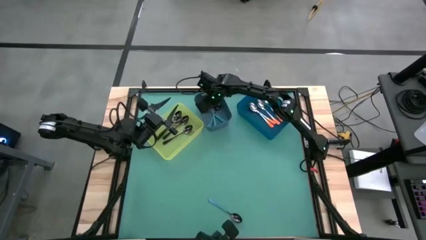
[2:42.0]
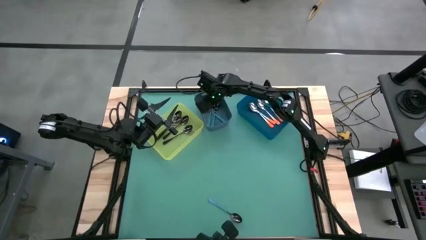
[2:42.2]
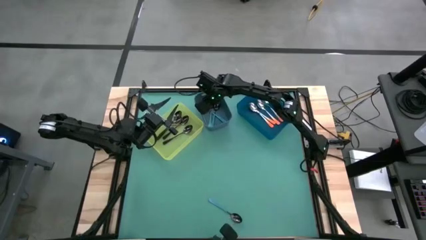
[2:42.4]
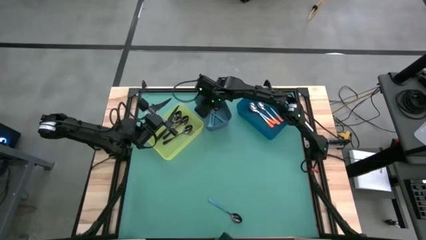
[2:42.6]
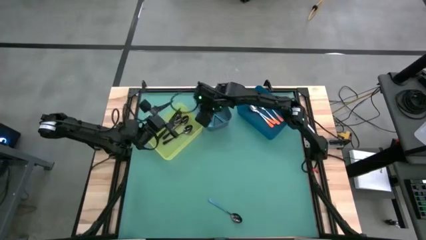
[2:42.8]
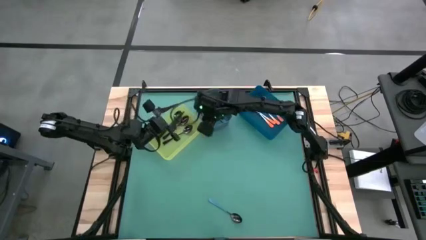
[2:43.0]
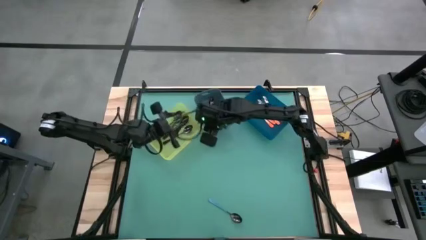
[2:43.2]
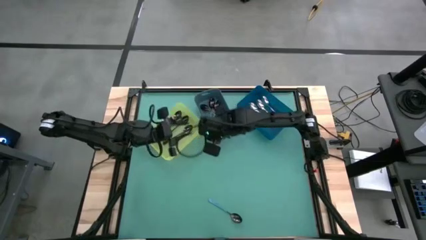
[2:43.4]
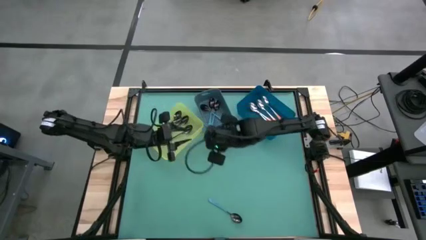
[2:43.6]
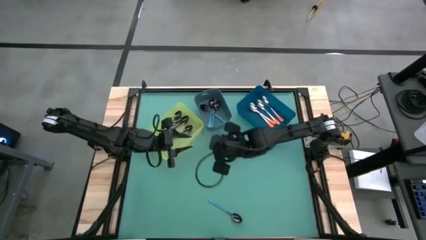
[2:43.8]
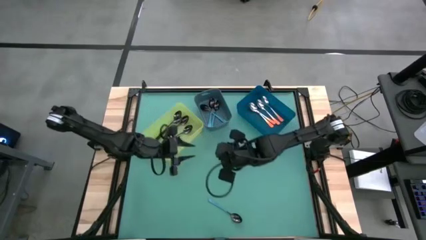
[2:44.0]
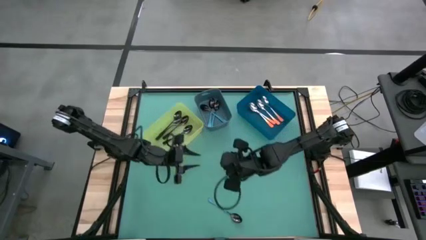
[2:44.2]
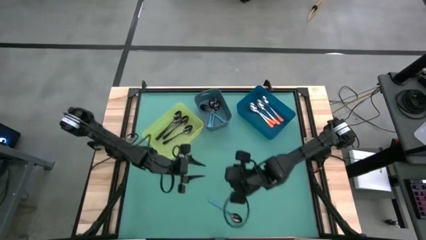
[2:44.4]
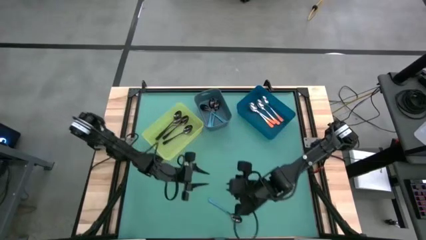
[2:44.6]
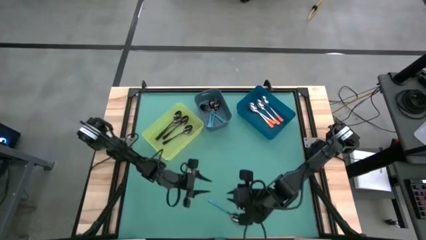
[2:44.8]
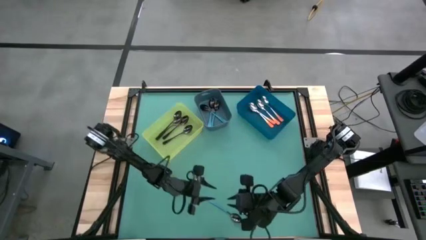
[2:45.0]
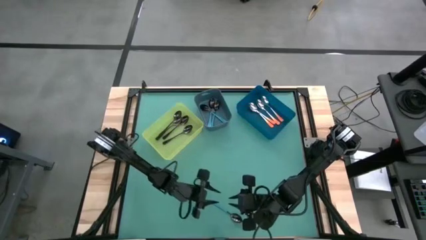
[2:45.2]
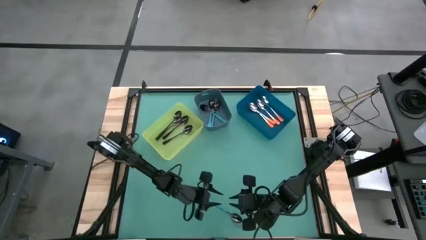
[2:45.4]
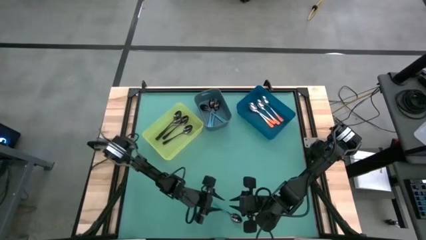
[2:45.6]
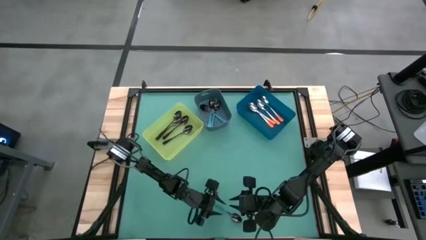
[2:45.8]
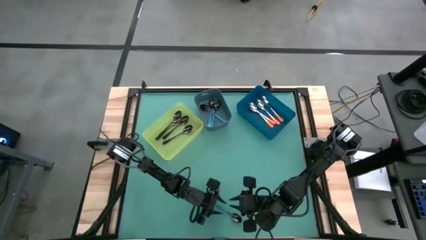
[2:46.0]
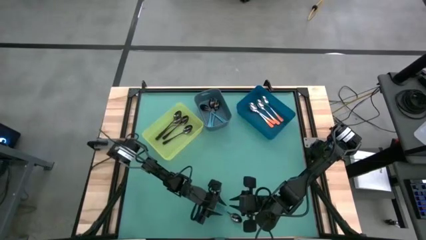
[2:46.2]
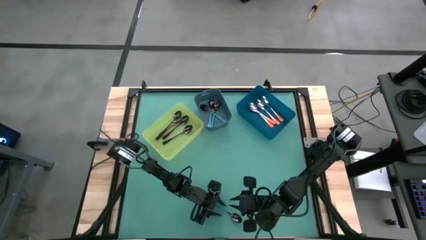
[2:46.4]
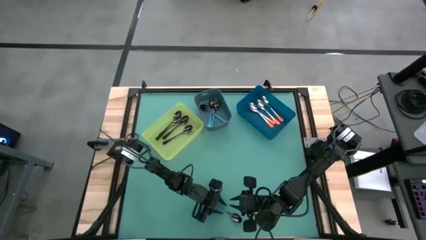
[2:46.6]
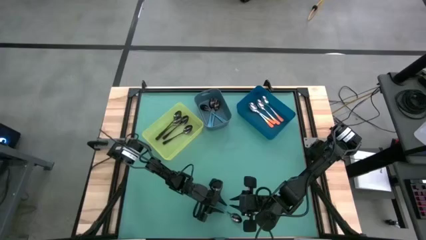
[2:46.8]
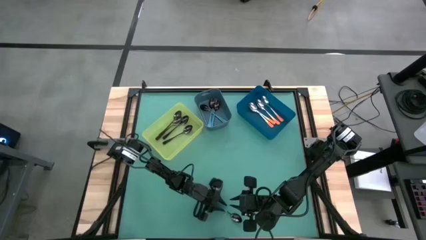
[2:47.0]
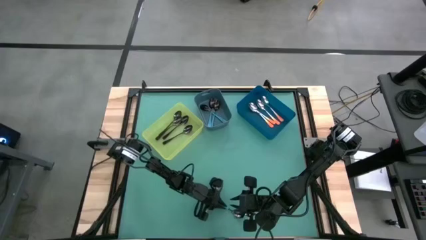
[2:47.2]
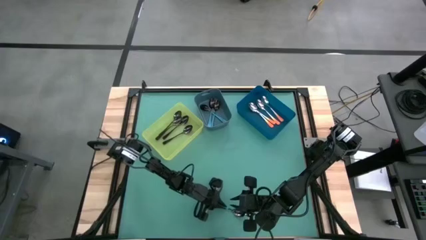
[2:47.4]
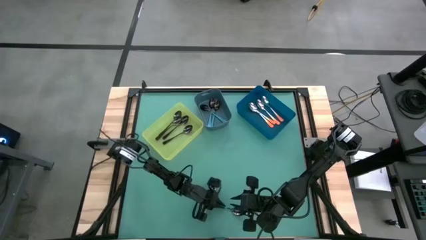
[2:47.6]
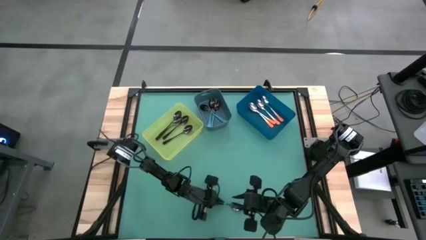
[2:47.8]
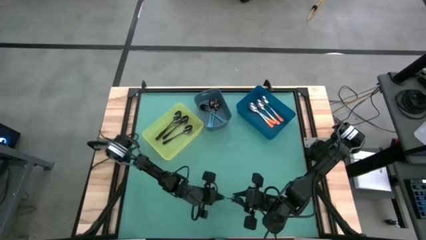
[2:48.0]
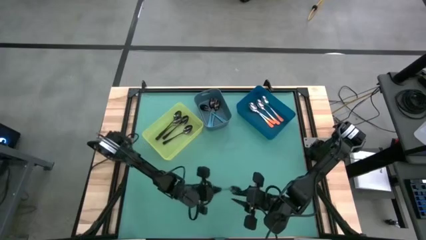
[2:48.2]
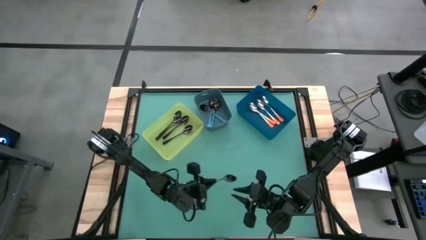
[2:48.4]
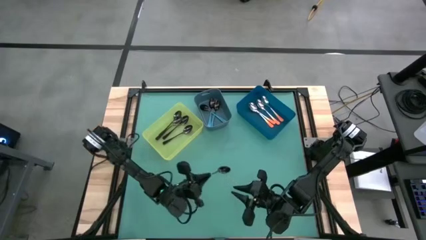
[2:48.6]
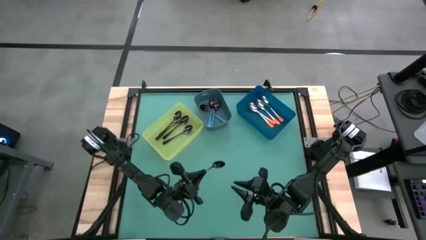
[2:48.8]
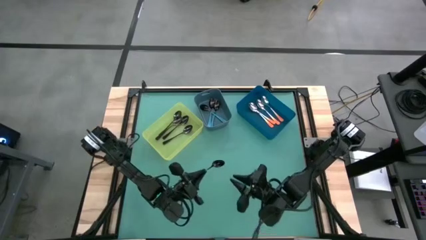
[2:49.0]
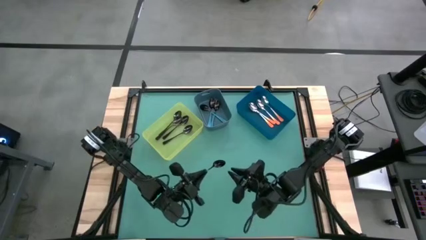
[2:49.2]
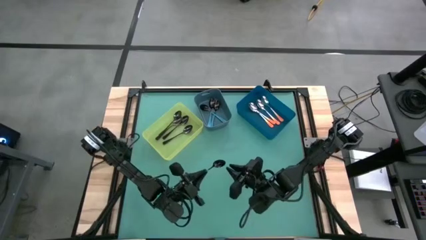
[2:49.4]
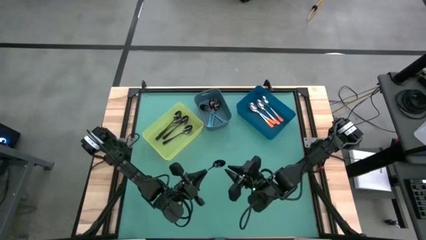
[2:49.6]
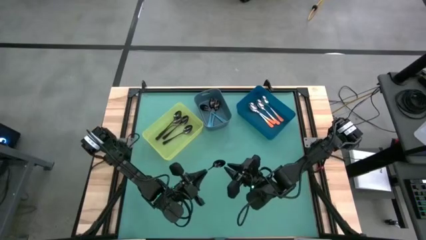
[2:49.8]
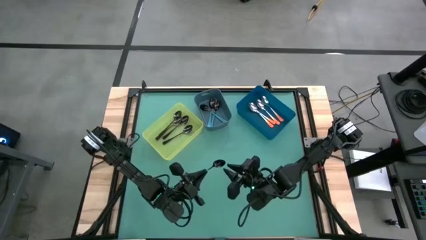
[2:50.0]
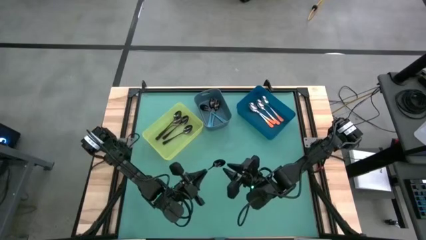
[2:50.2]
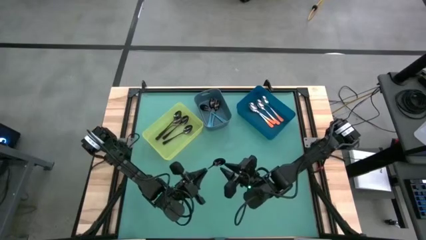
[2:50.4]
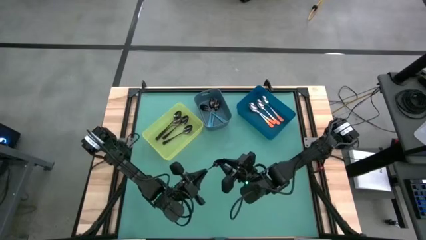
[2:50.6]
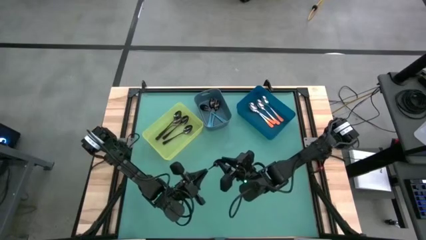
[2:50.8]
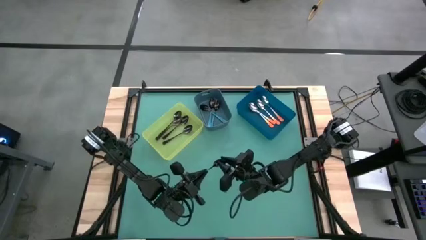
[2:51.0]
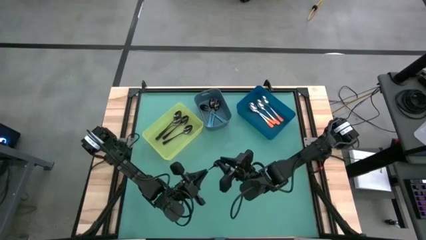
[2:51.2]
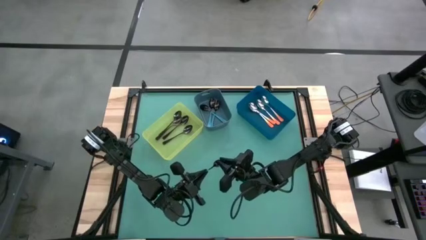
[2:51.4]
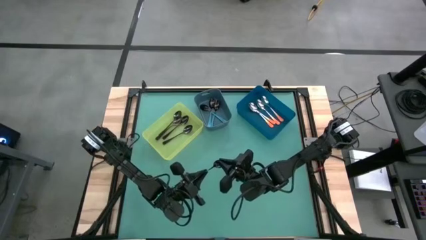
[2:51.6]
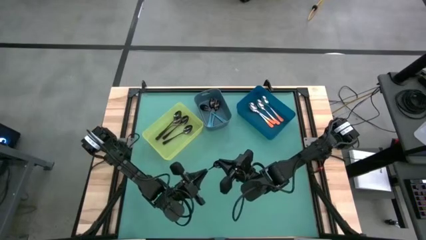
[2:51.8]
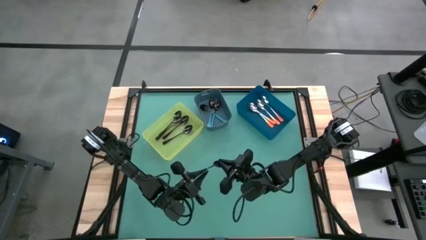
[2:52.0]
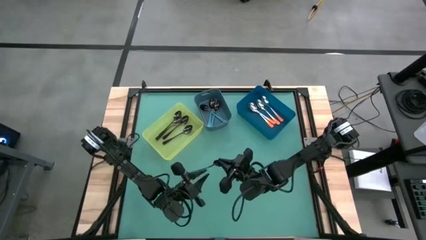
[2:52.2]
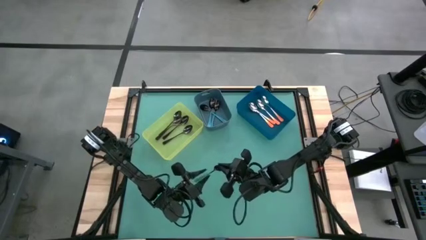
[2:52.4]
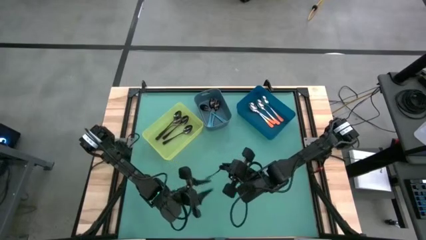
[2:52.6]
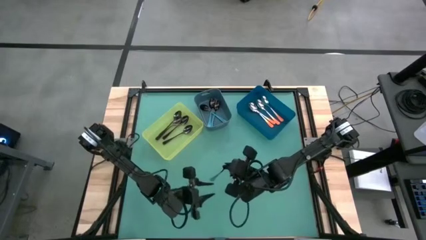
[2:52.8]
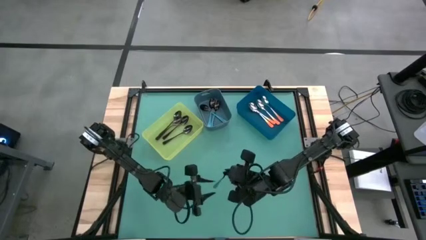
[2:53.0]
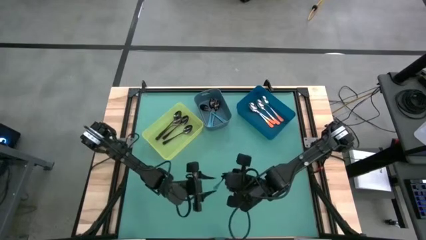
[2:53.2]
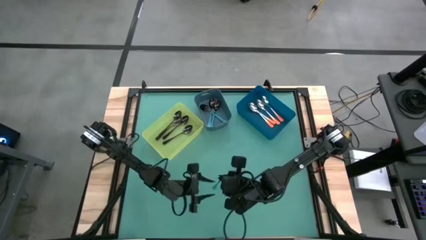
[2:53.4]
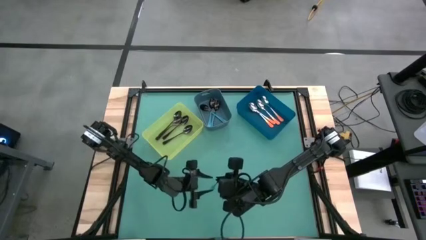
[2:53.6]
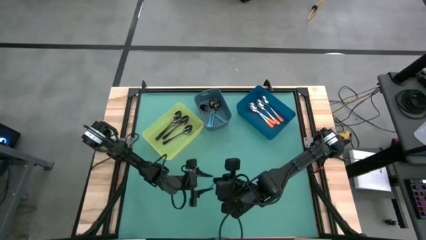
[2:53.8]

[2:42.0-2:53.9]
Task: Sort silverware by color (type)
Put the blue spoon into the dark blue bin
